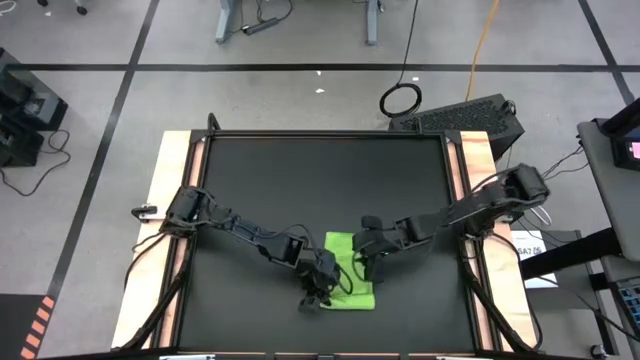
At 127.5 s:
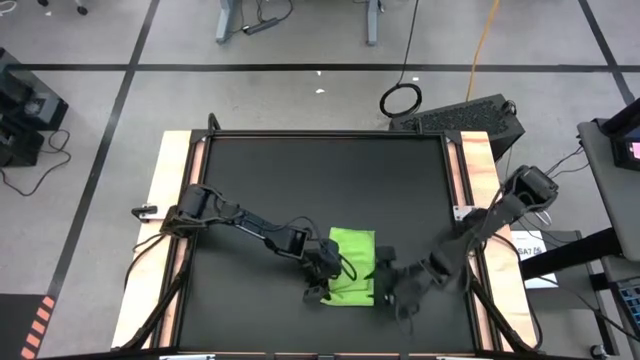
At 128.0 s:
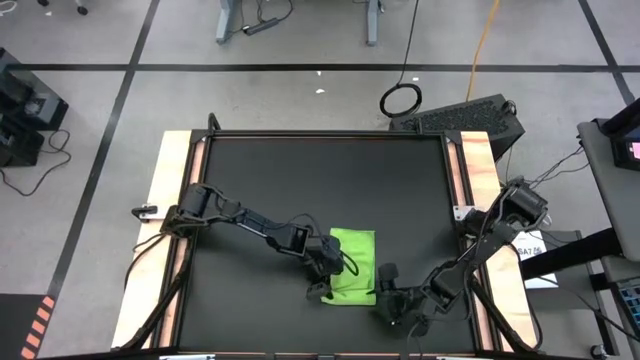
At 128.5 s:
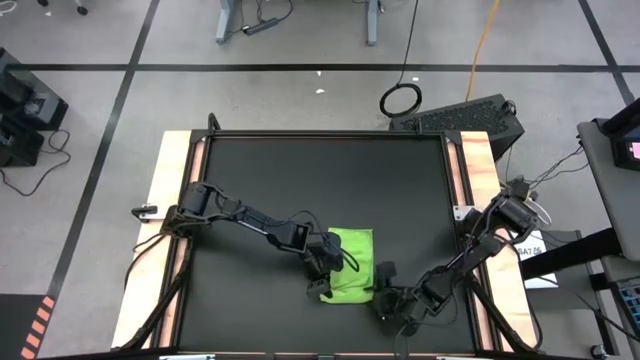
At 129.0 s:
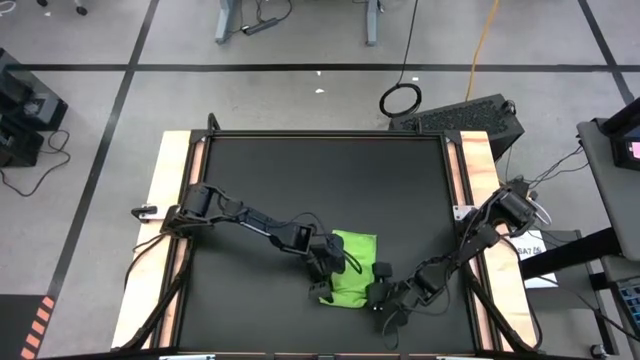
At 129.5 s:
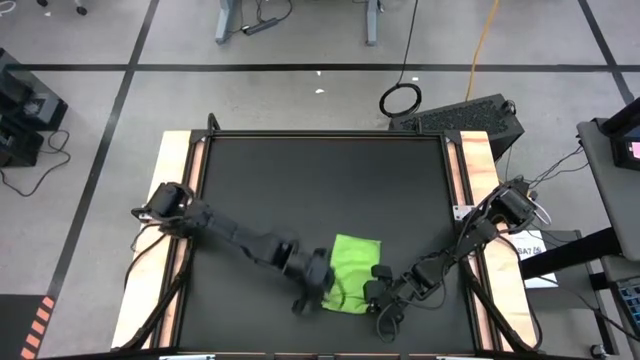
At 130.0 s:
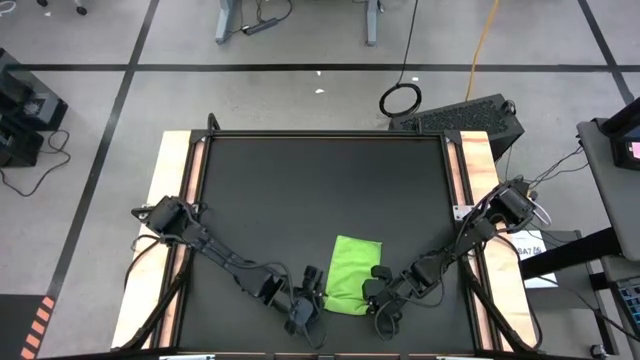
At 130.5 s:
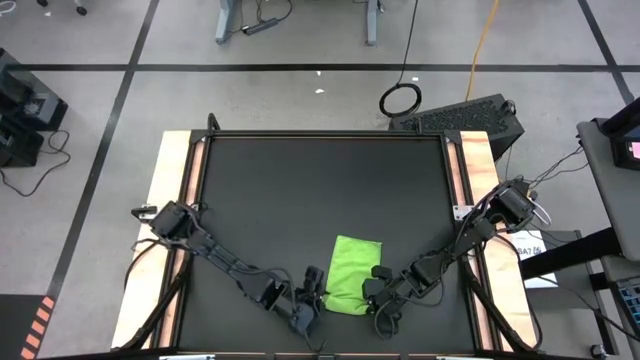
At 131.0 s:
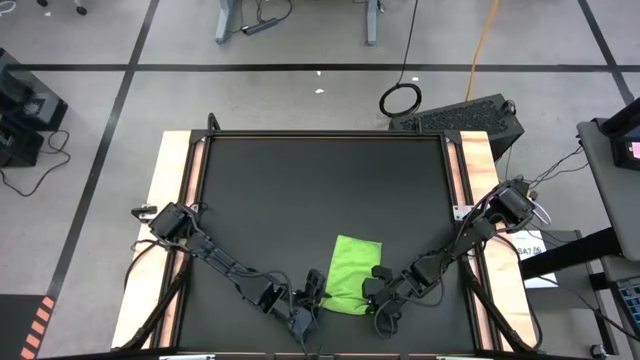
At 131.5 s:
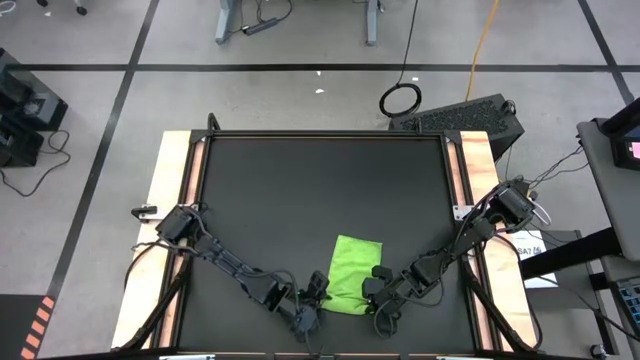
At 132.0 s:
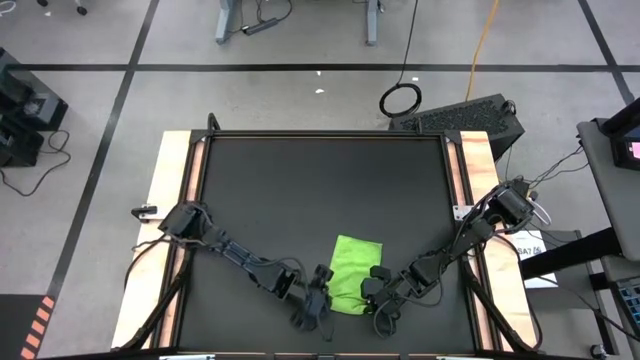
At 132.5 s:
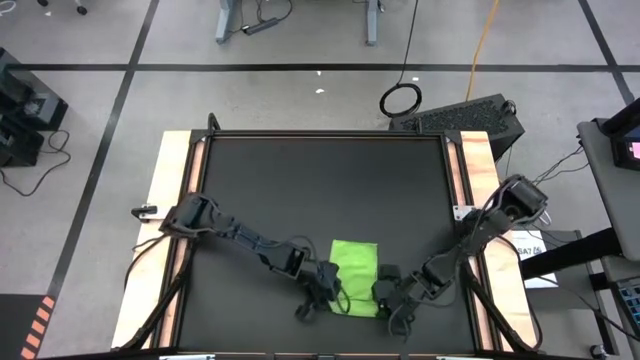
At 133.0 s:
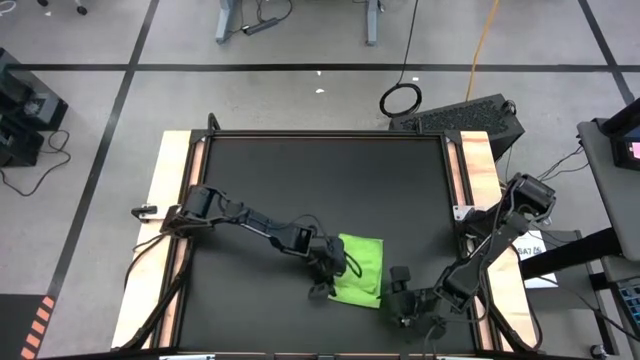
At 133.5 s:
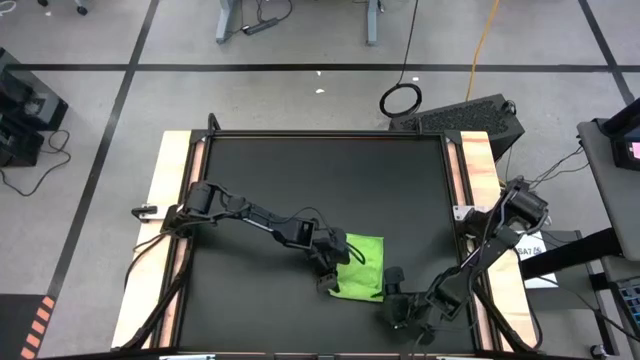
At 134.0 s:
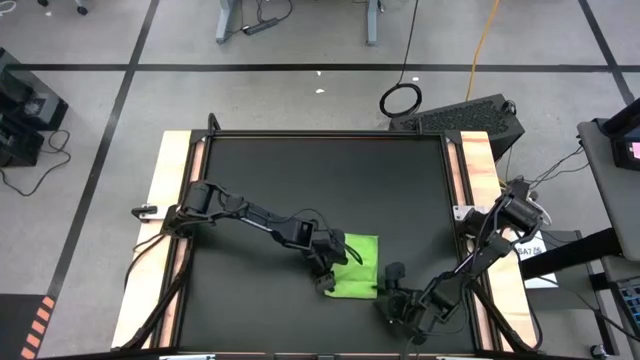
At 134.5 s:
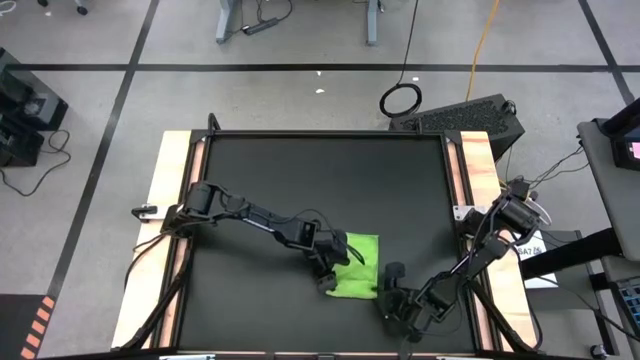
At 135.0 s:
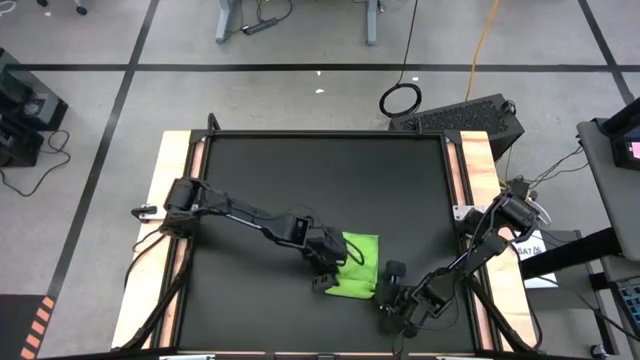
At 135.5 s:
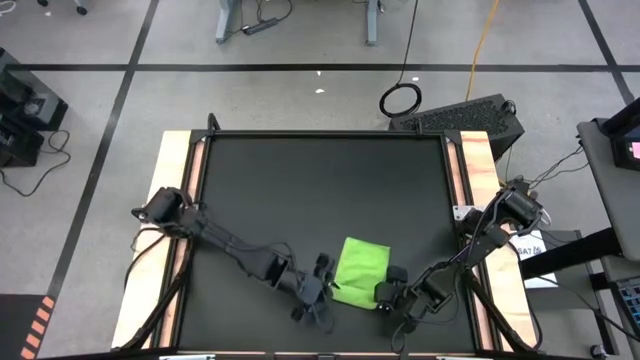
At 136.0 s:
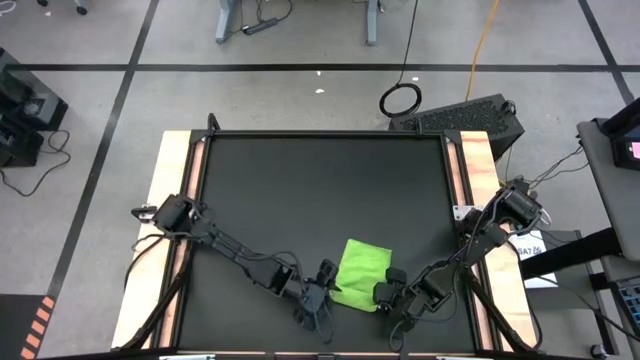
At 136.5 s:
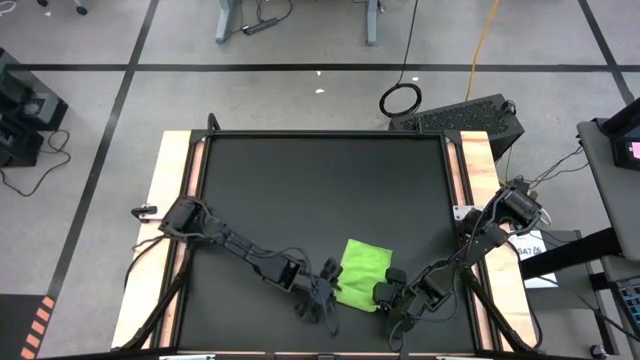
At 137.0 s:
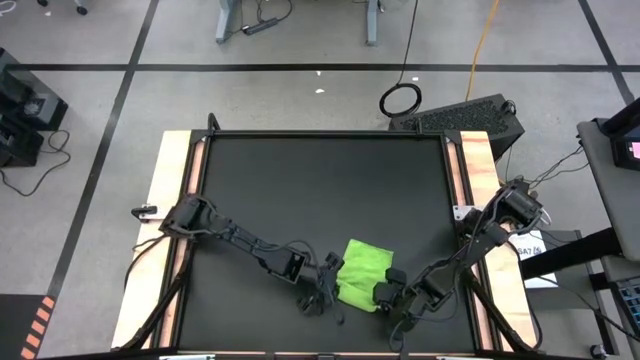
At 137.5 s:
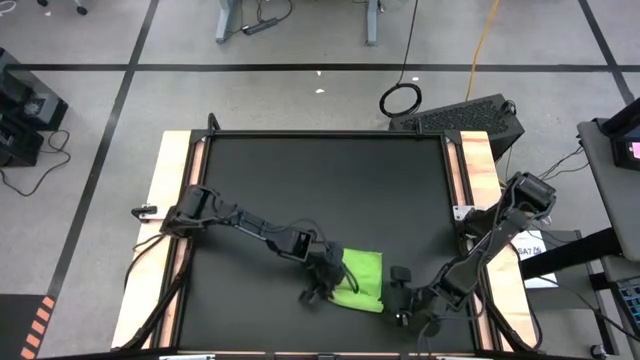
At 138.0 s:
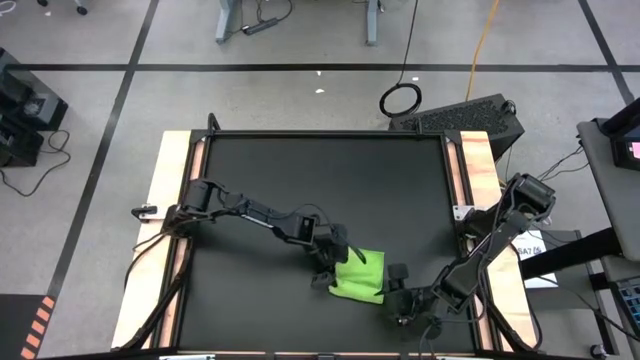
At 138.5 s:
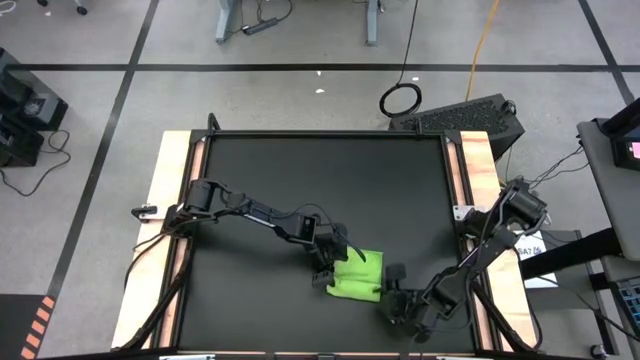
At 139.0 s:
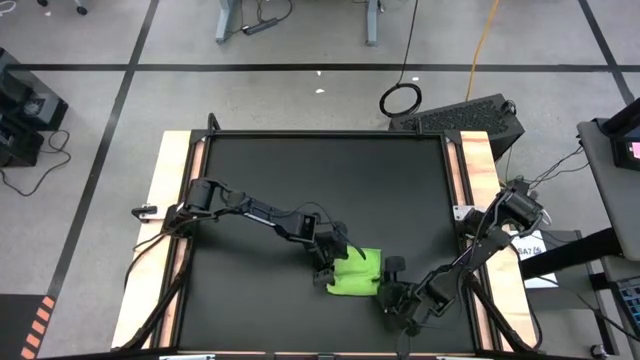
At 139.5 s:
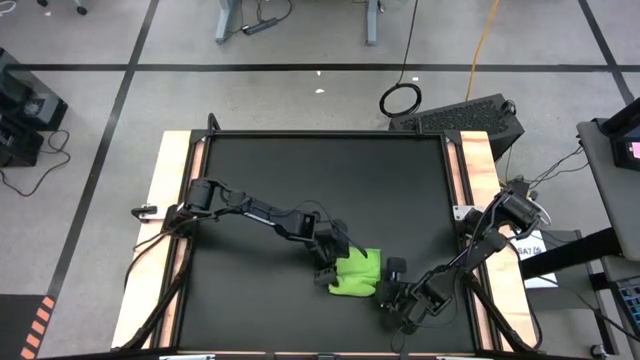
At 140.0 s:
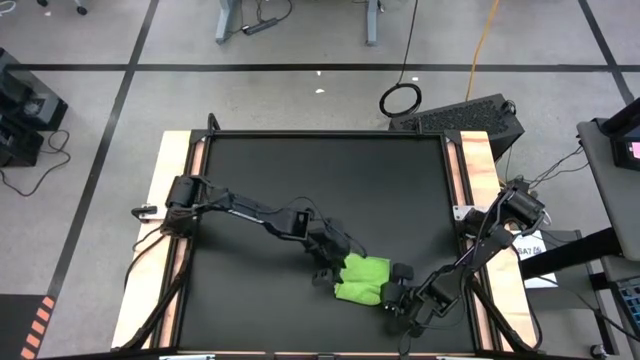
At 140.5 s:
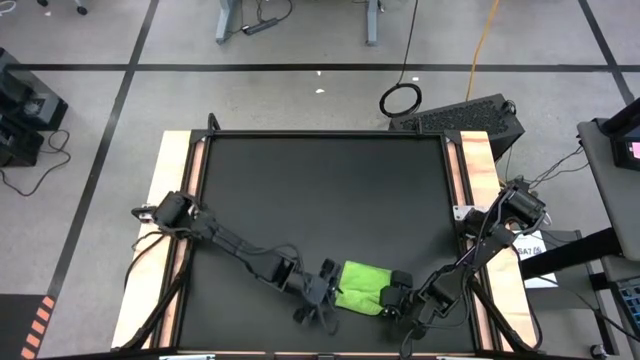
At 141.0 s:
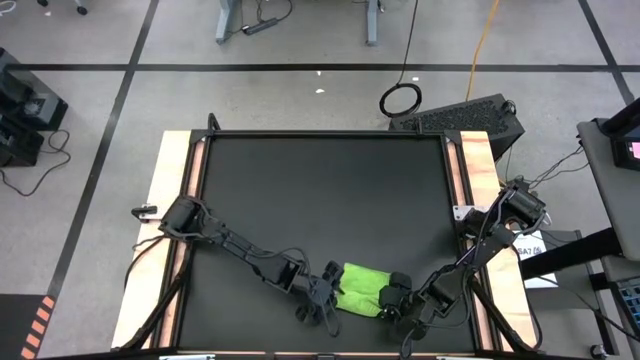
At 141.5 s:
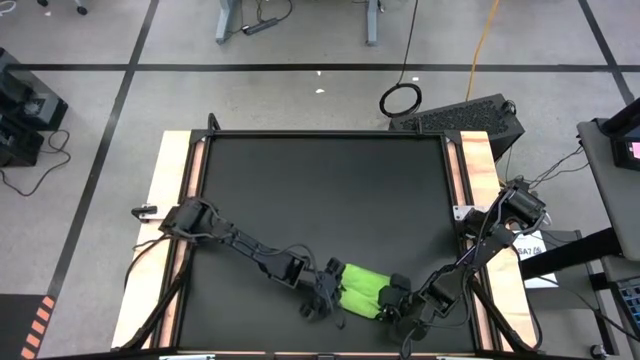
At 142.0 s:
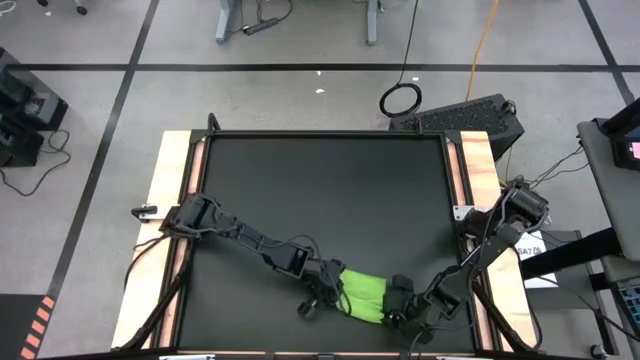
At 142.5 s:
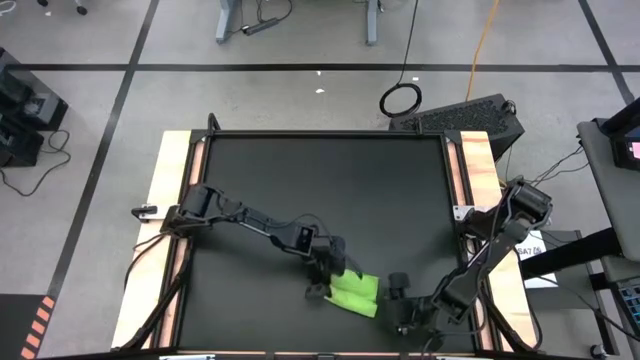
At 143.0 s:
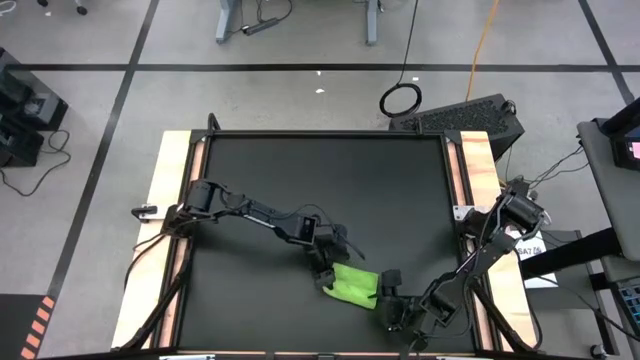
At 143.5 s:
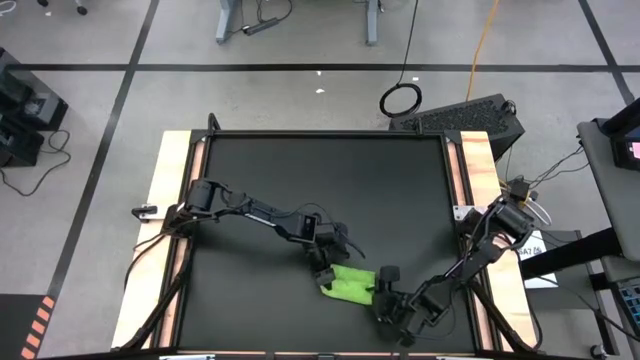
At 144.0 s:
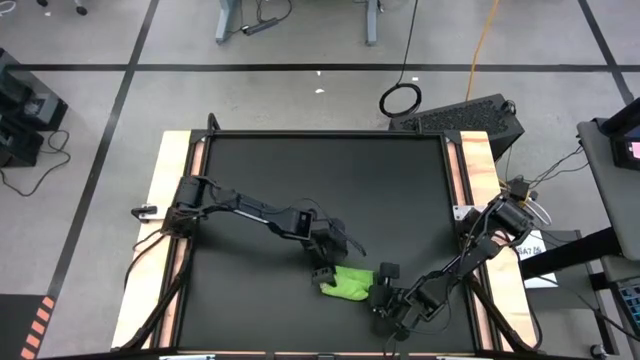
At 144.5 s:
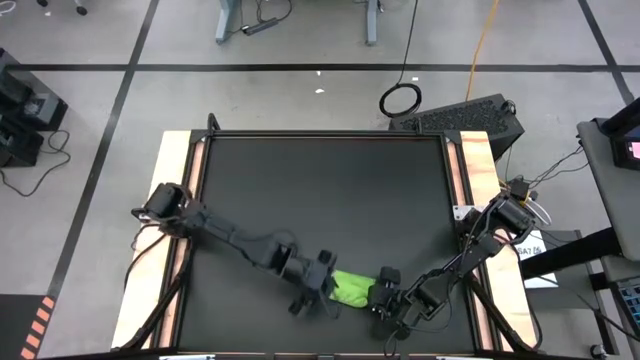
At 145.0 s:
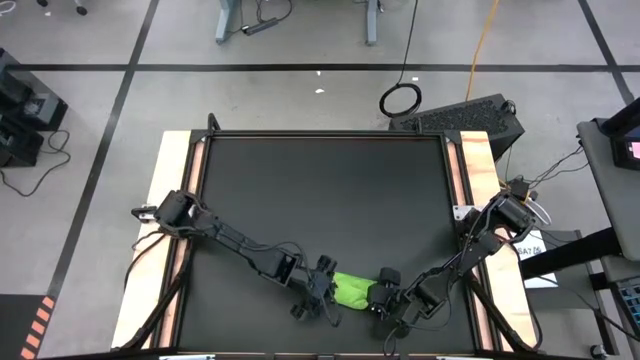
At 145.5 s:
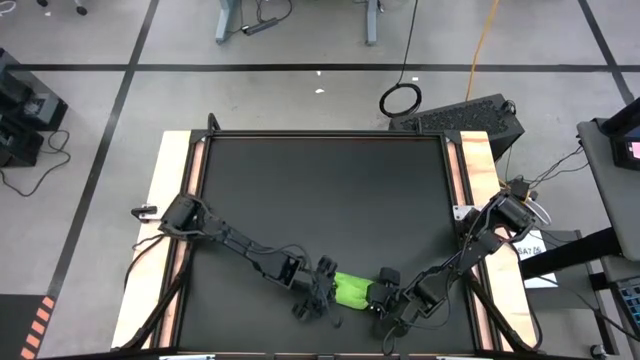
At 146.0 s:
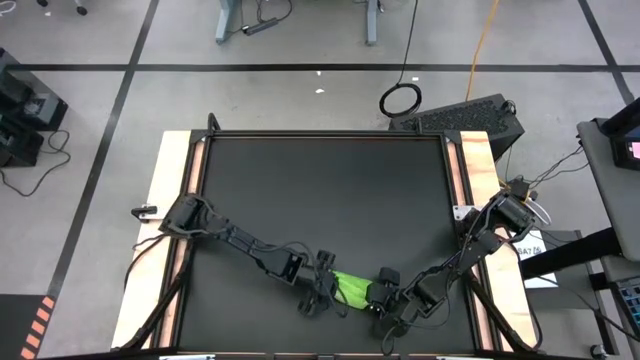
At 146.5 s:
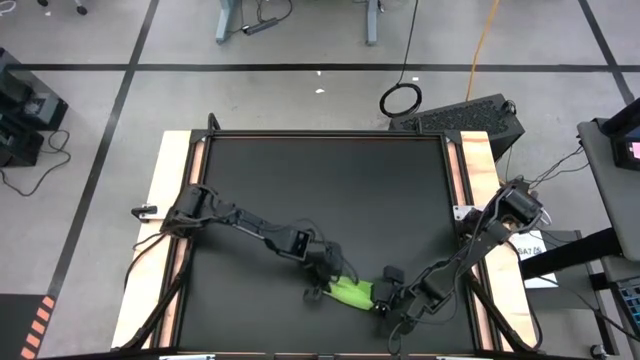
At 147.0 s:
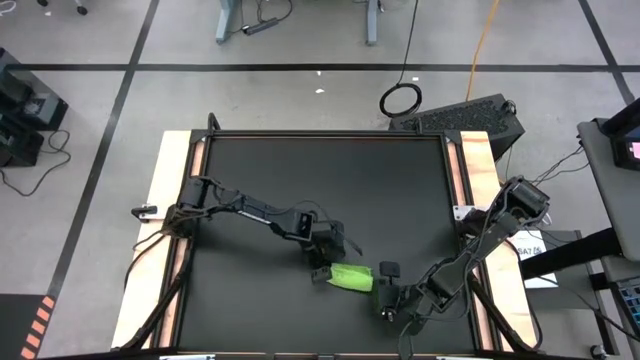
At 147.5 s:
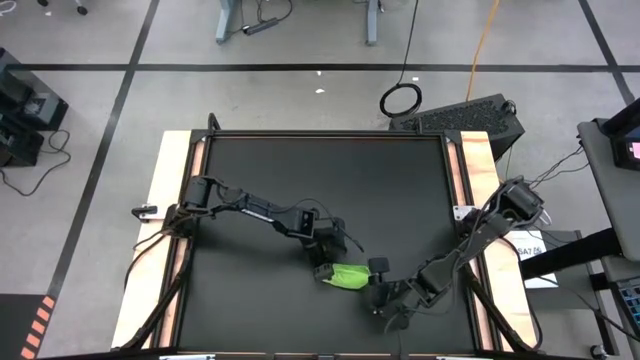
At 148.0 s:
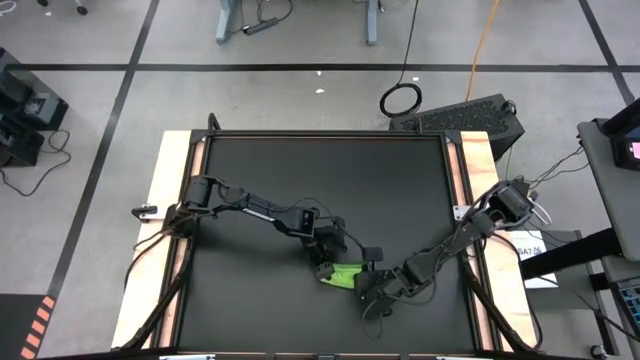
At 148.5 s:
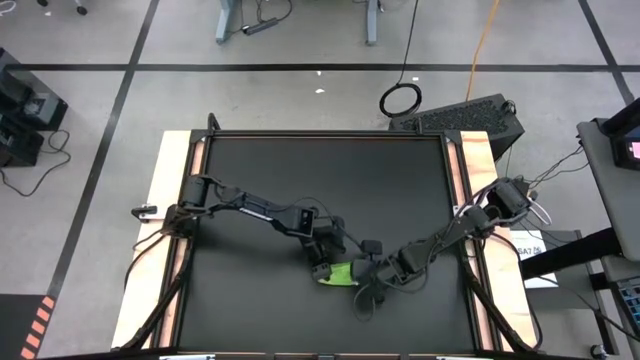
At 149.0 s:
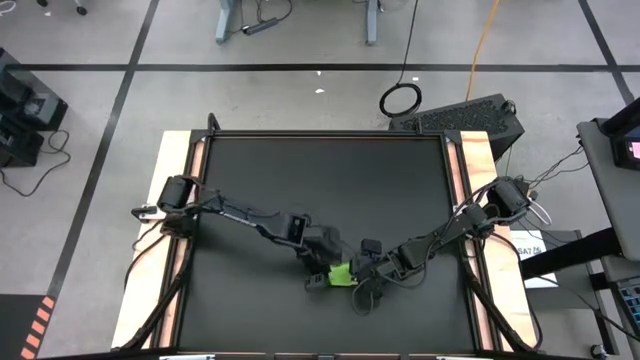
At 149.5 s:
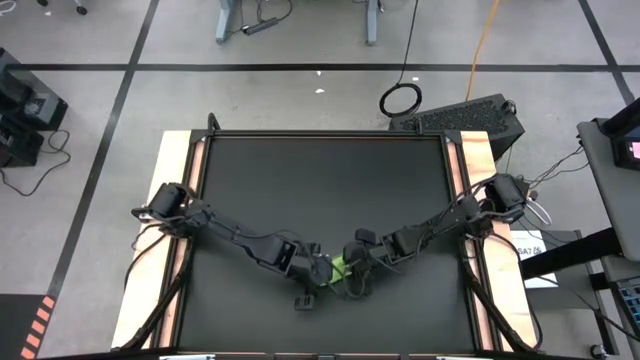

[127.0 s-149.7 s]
Task: Roll towel
Roll the green microfiber towel
